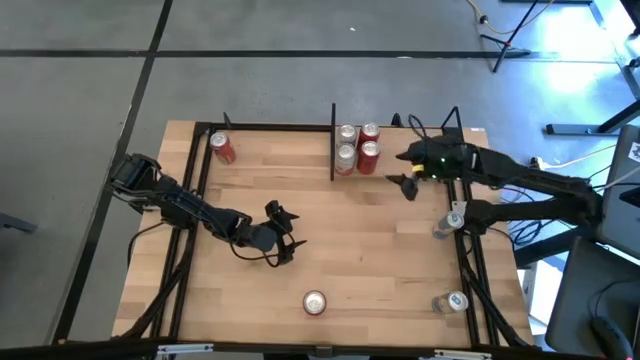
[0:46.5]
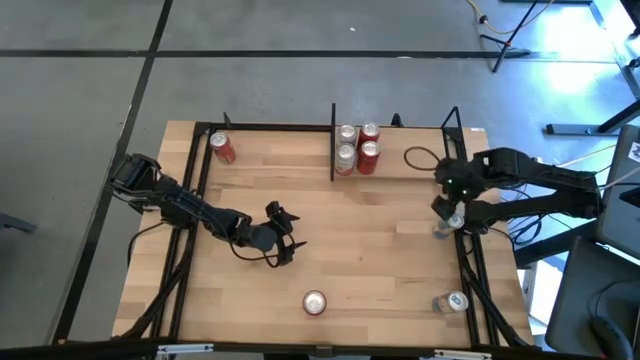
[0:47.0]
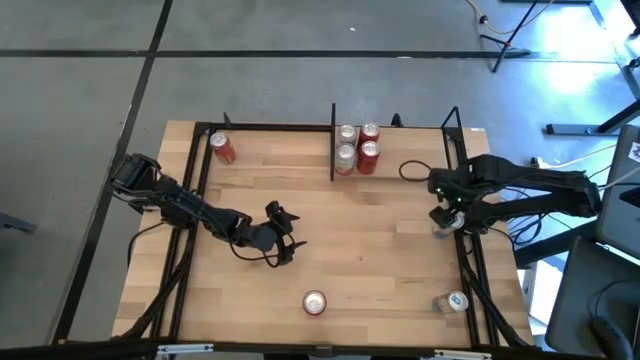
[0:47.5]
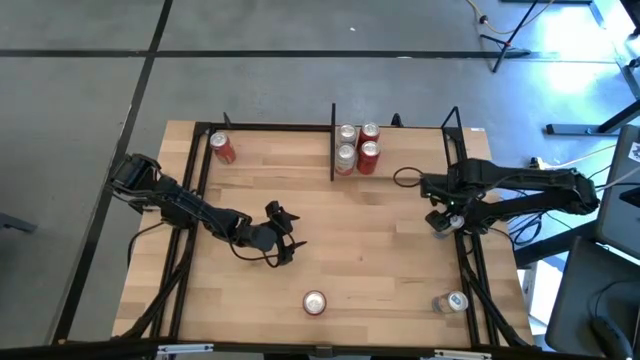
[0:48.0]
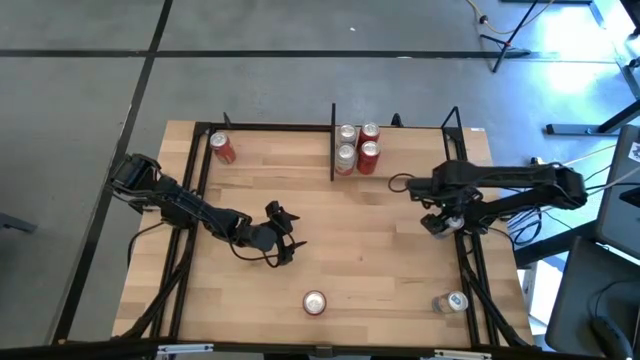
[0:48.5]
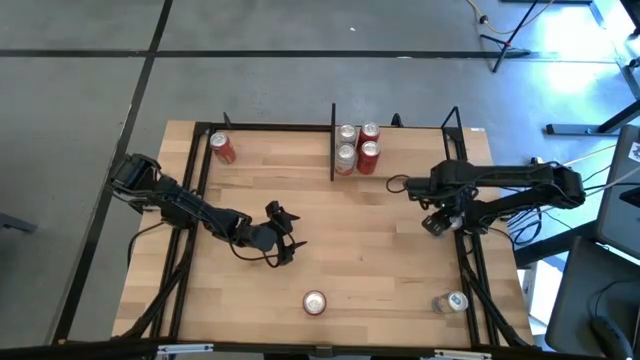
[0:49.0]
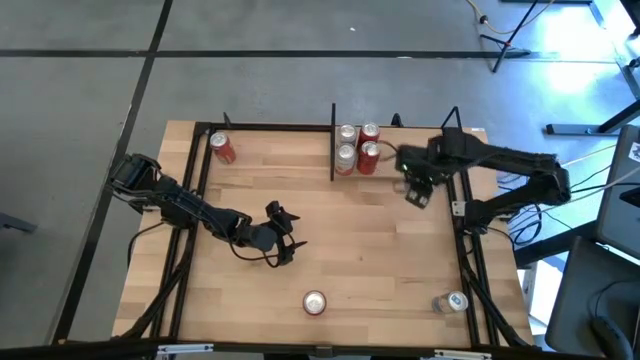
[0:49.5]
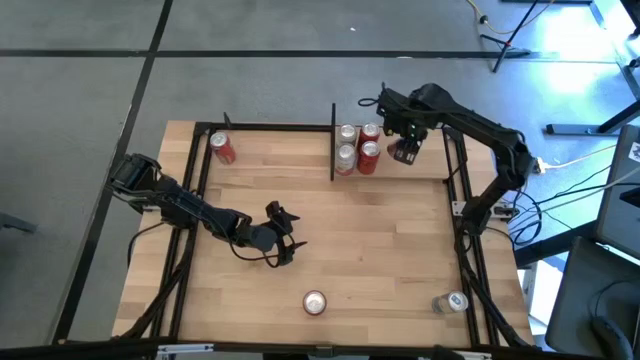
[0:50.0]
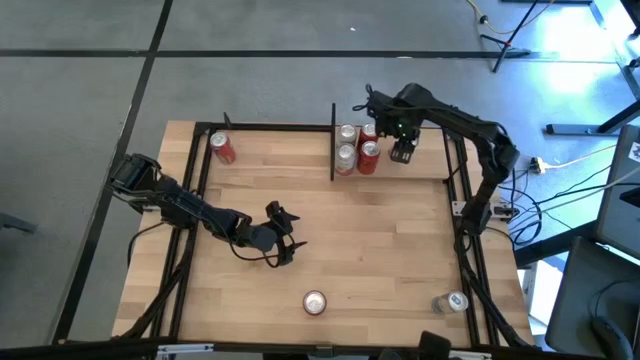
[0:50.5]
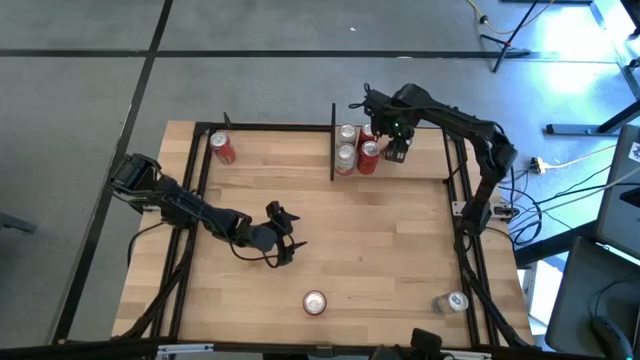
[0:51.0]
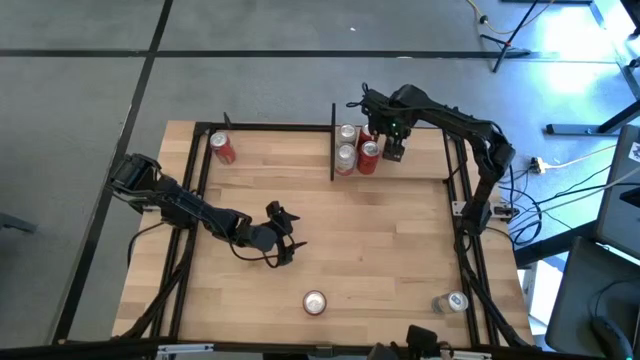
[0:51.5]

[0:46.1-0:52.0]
Task: Place canned beverage on shelf
Put the top blue soda can on the shelf

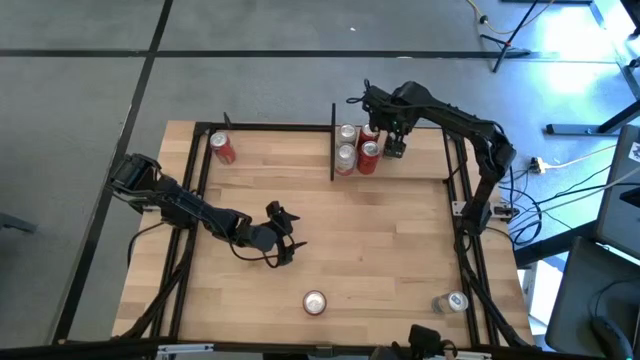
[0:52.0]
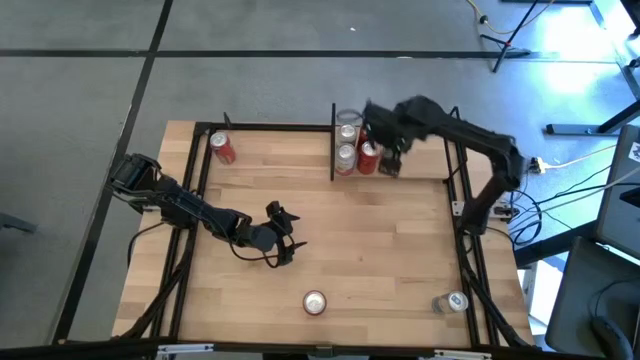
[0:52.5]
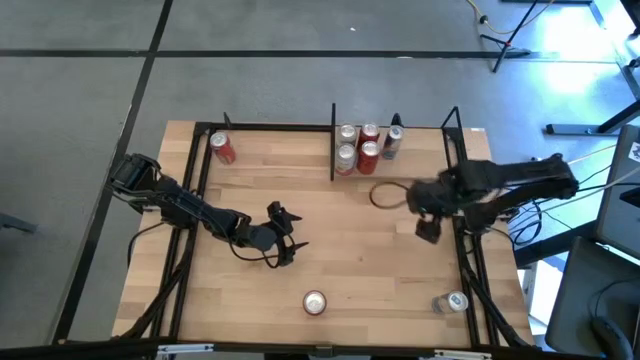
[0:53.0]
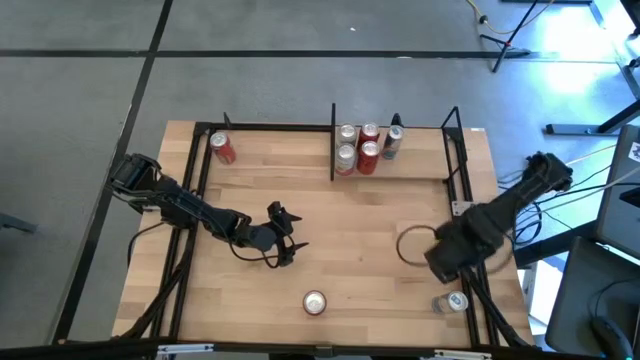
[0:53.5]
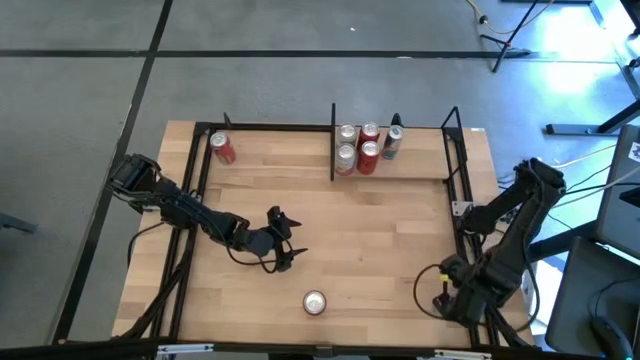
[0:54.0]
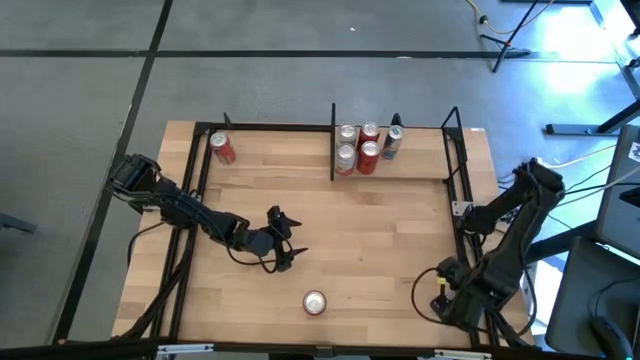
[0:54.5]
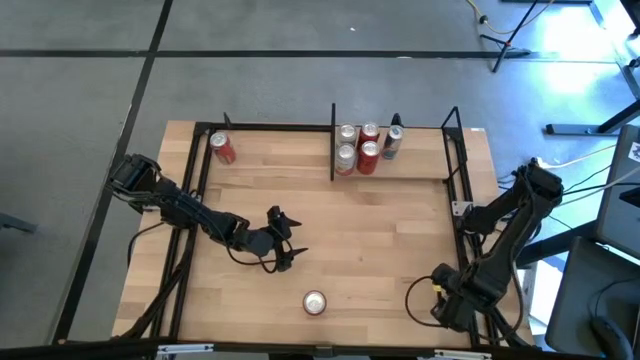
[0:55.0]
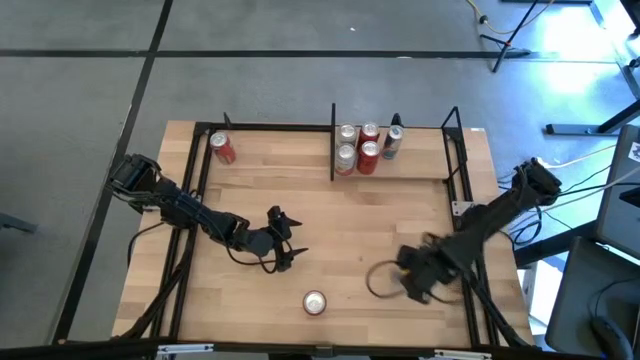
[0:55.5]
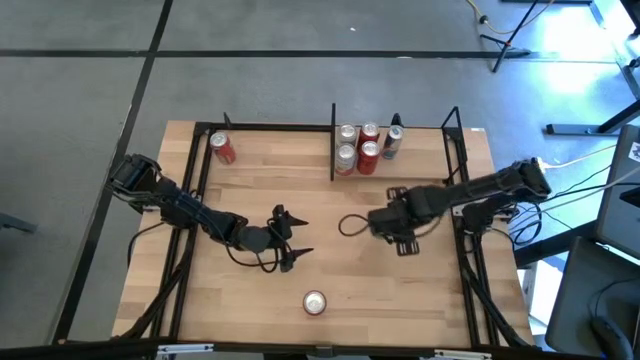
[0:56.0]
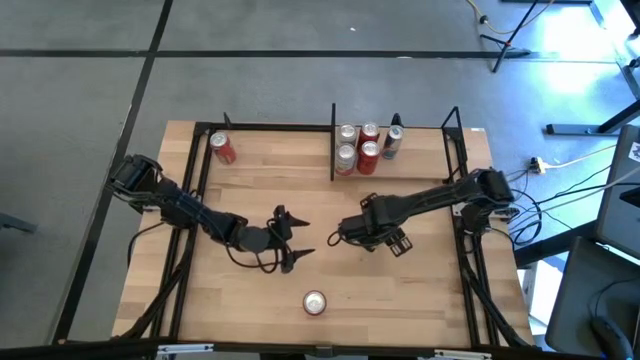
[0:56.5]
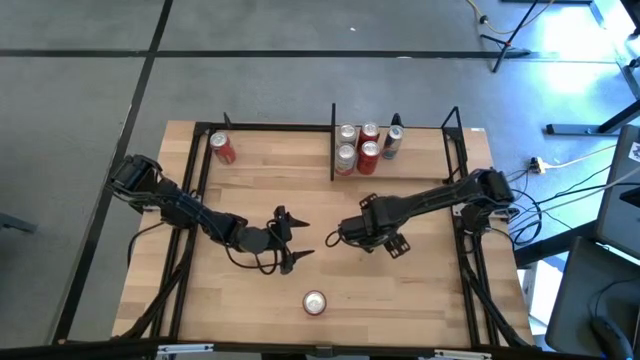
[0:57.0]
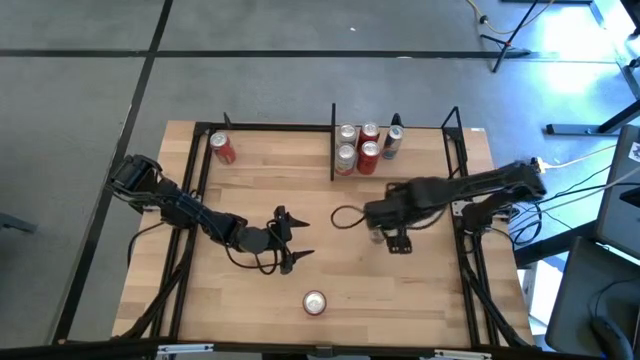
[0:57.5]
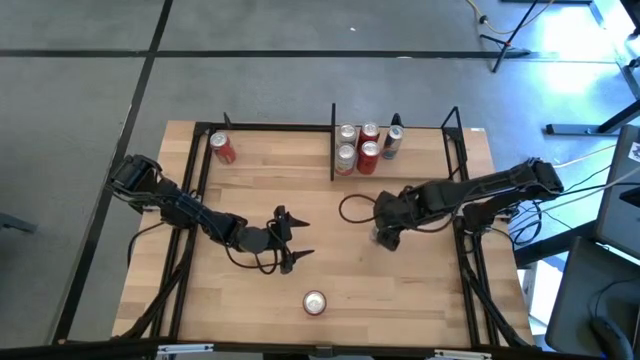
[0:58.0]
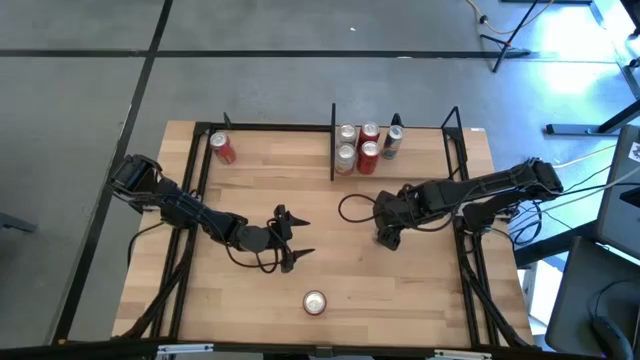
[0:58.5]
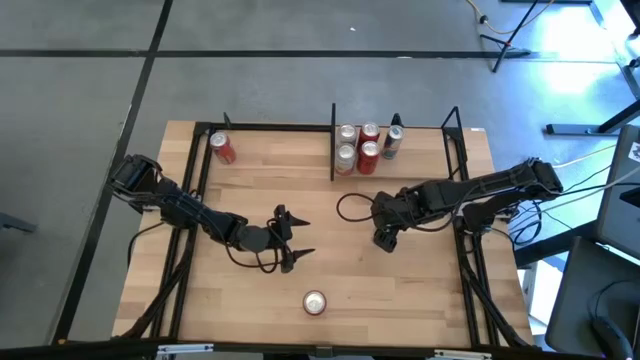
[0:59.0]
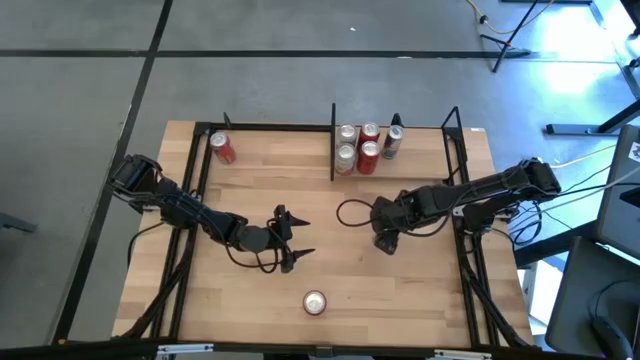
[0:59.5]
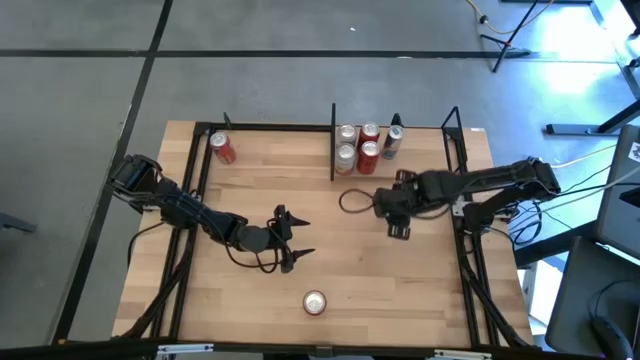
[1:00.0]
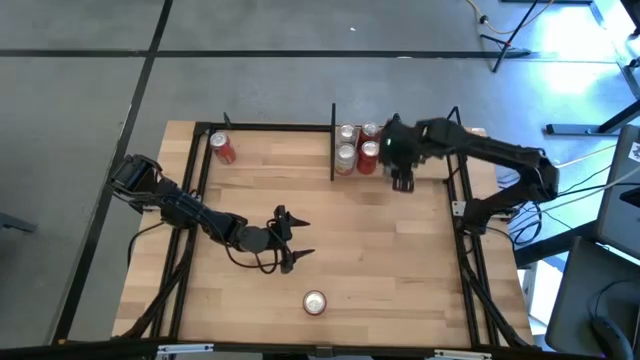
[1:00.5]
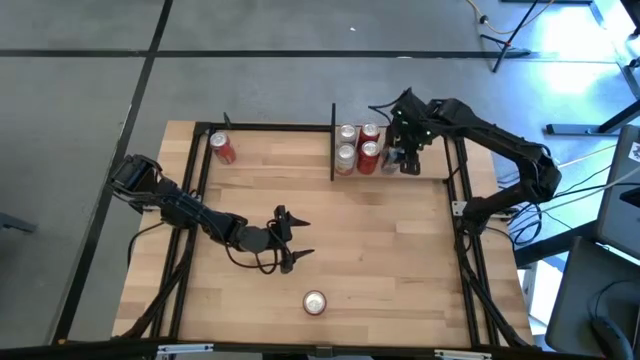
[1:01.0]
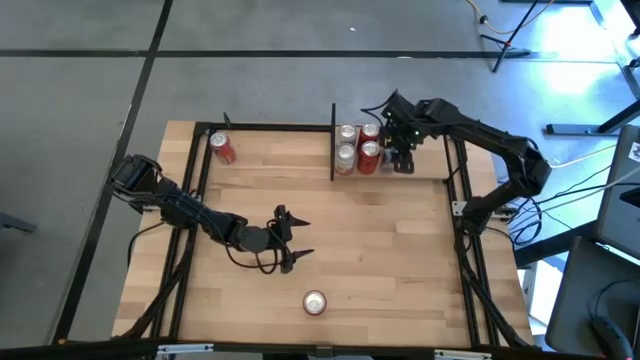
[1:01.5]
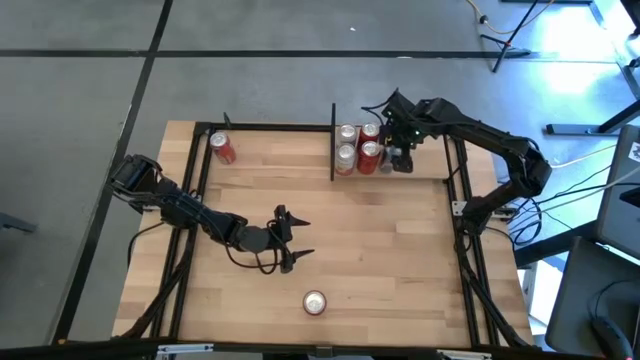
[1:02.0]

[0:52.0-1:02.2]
Put the blue soda can on the shelf aligned with the other blue soda can

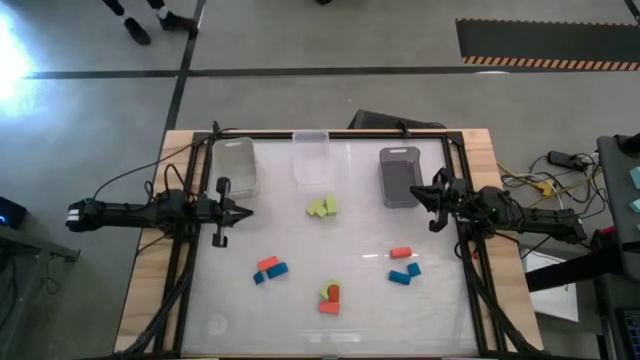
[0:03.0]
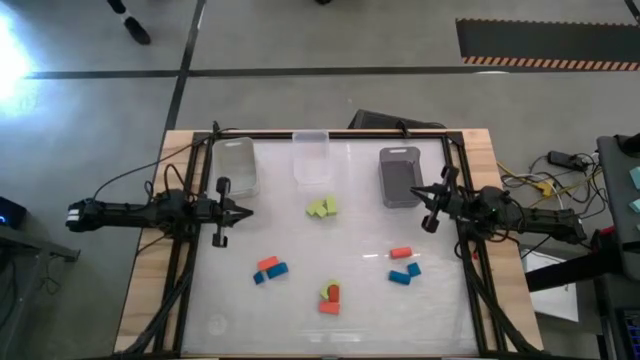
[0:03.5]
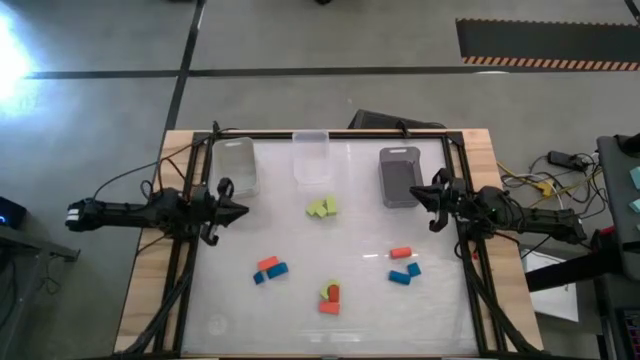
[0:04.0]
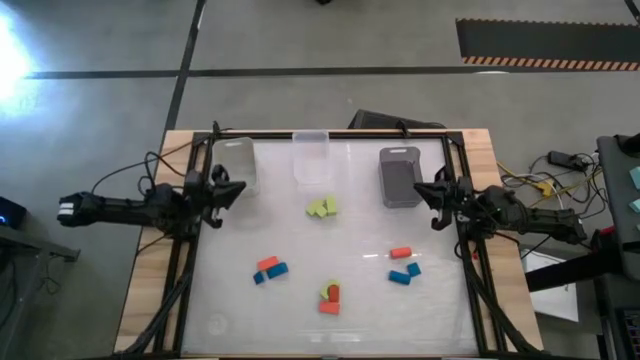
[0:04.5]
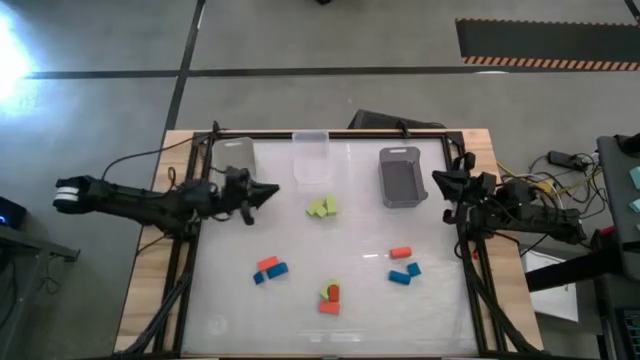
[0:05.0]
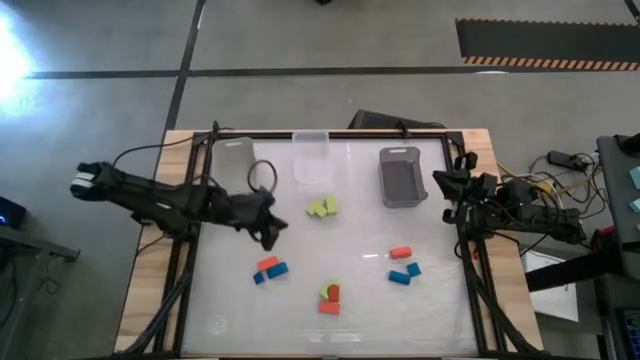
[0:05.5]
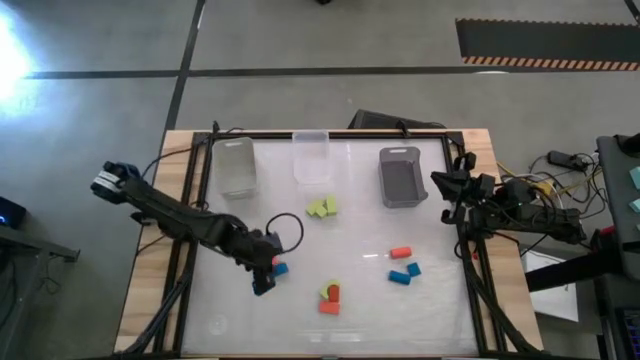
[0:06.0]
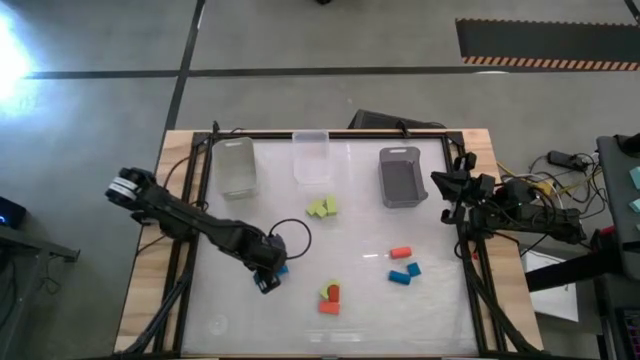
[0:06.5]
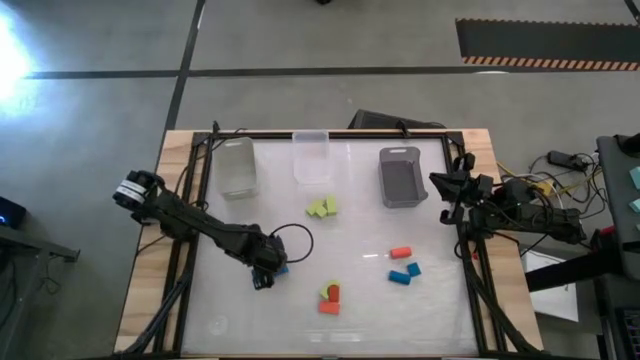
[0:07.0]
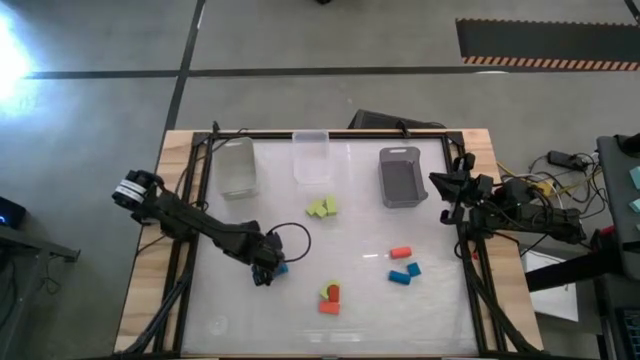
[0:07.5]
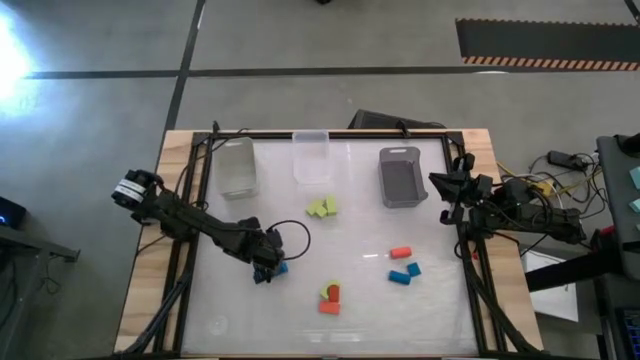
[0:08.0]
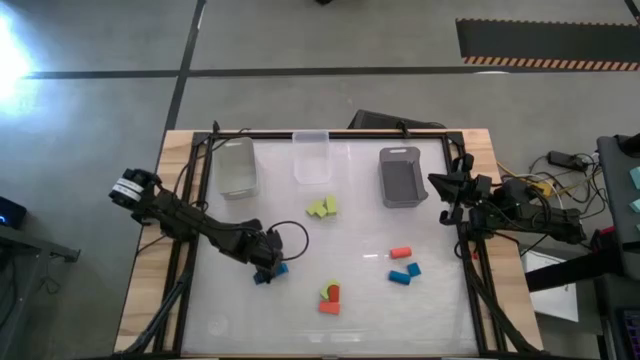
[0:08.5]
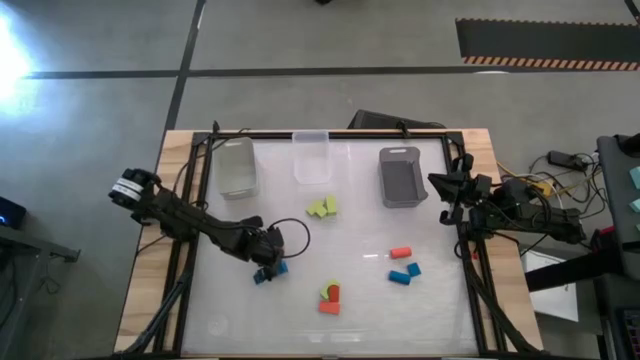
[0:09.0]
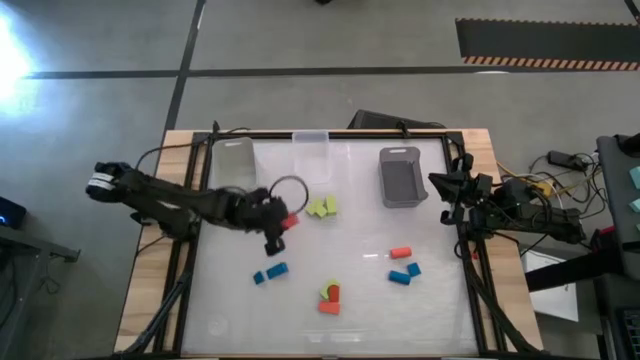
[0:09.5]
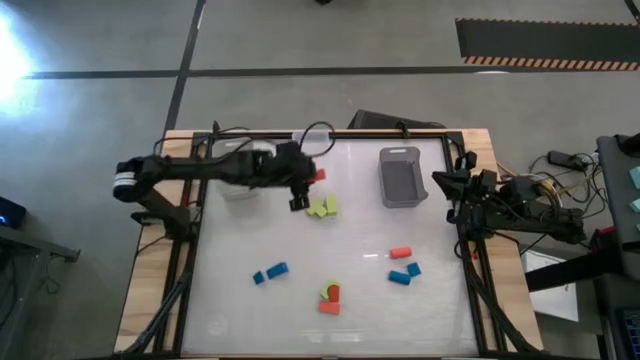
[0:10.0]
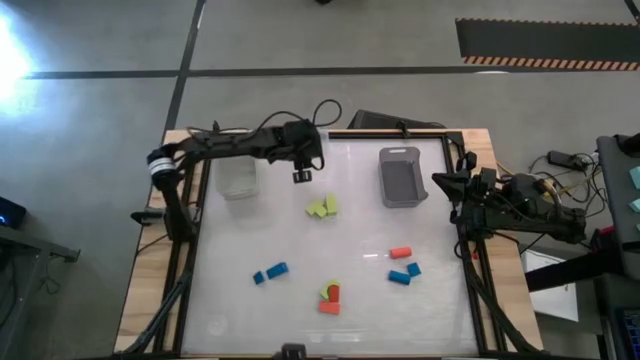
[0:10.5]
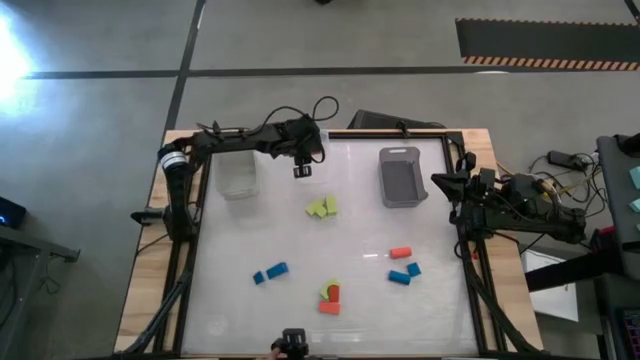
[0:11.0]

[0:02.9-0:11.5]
Task: Sort & place blocks by color
Put the orange block into the transparent bin
